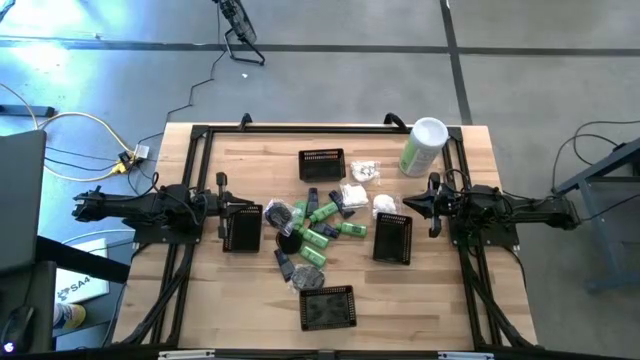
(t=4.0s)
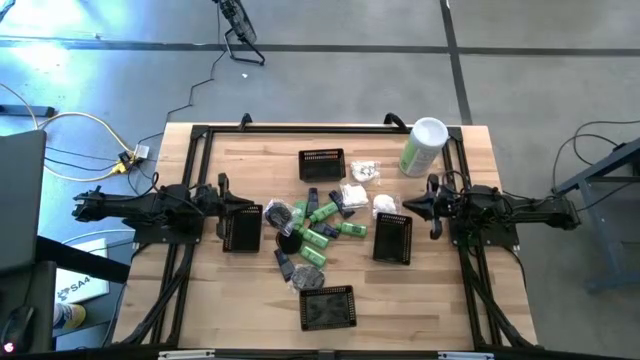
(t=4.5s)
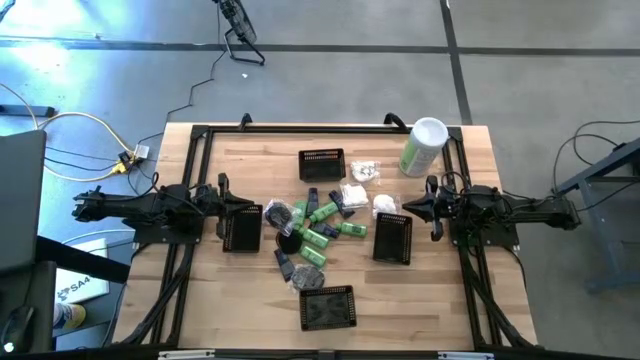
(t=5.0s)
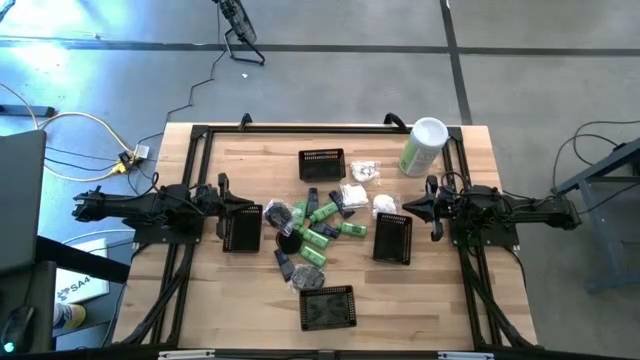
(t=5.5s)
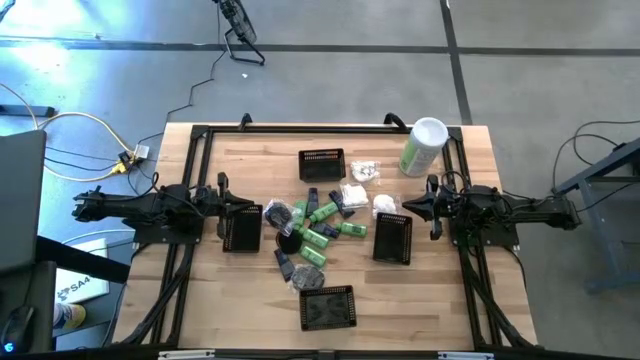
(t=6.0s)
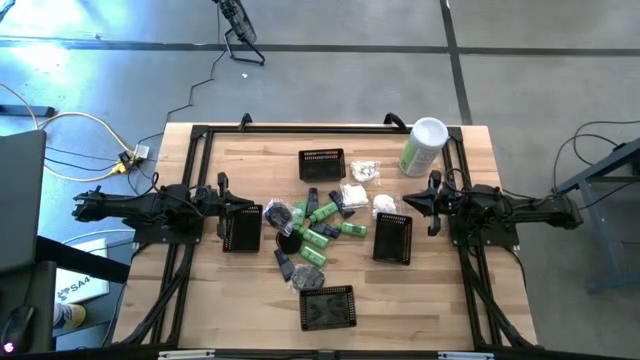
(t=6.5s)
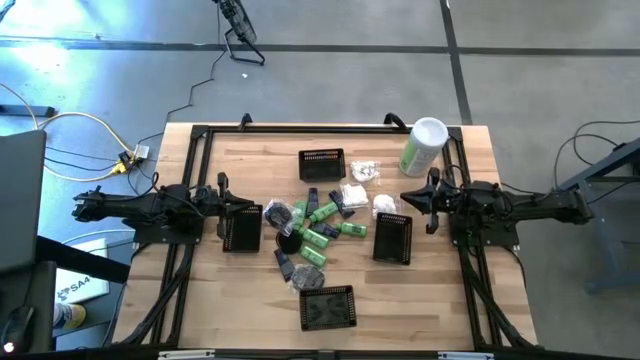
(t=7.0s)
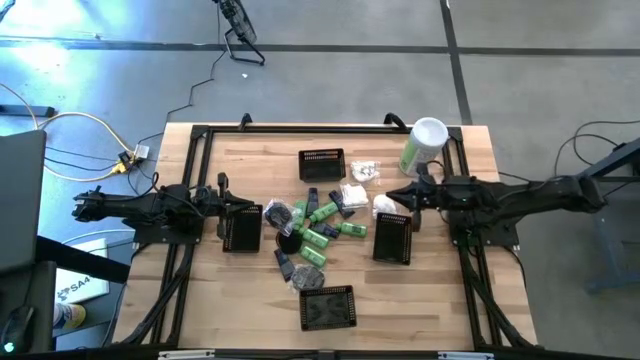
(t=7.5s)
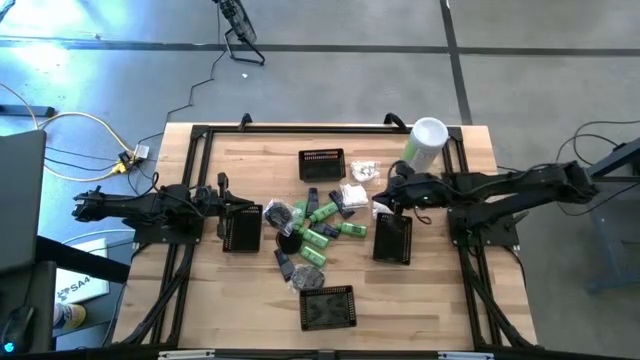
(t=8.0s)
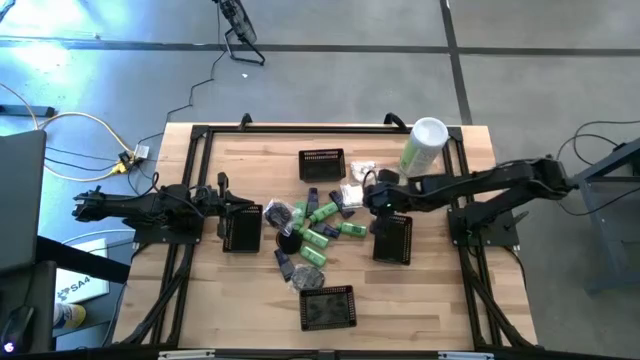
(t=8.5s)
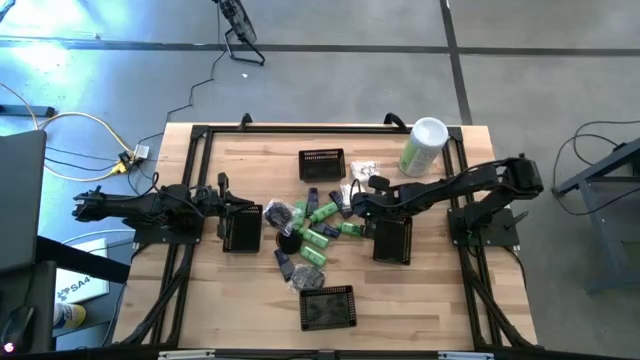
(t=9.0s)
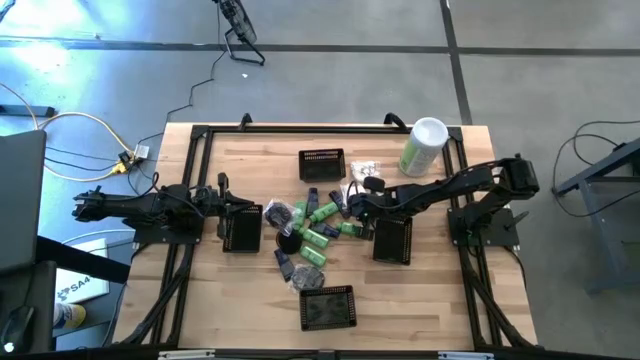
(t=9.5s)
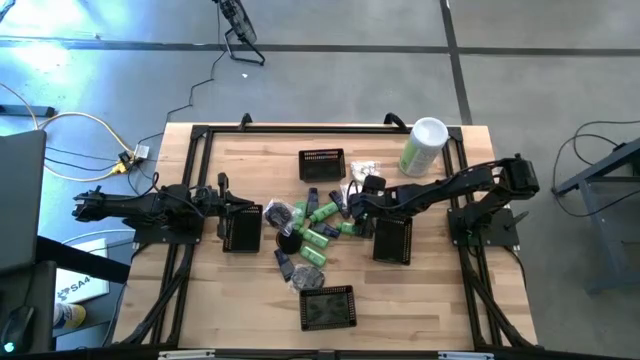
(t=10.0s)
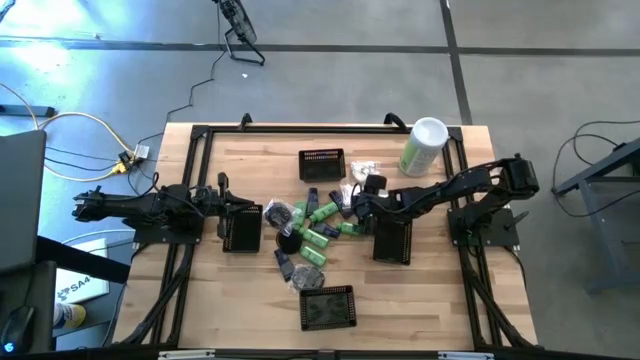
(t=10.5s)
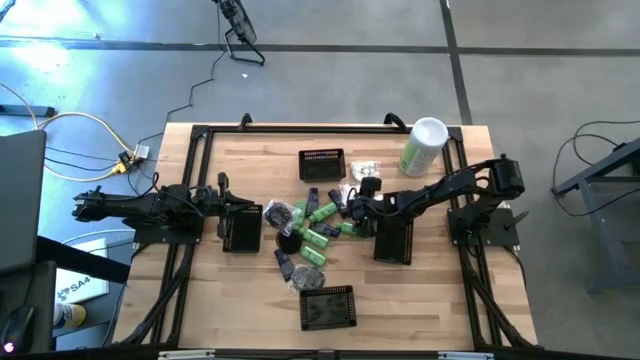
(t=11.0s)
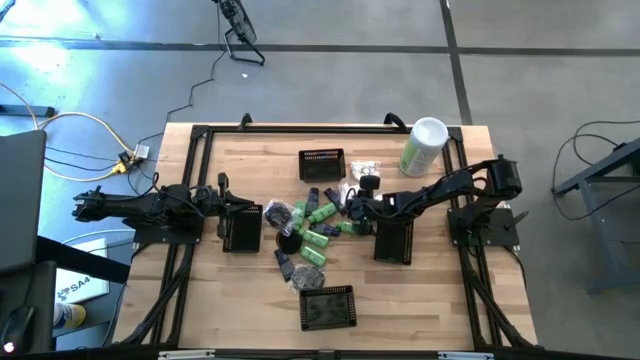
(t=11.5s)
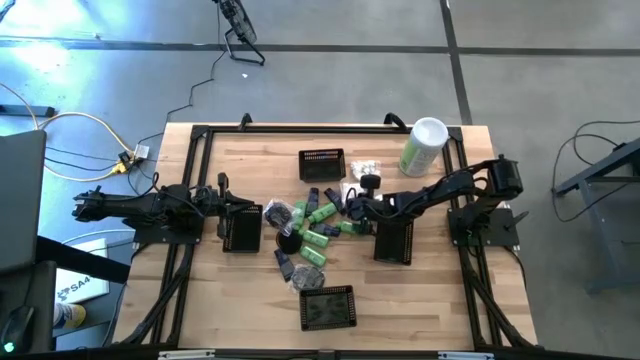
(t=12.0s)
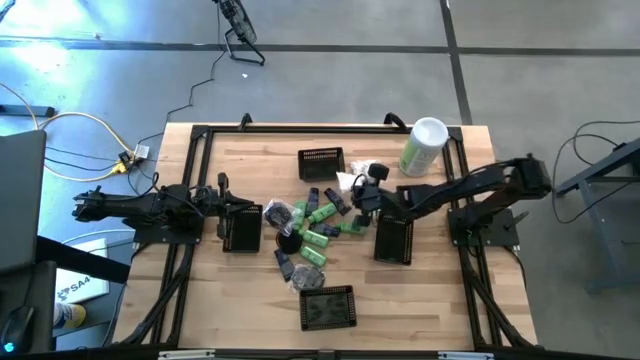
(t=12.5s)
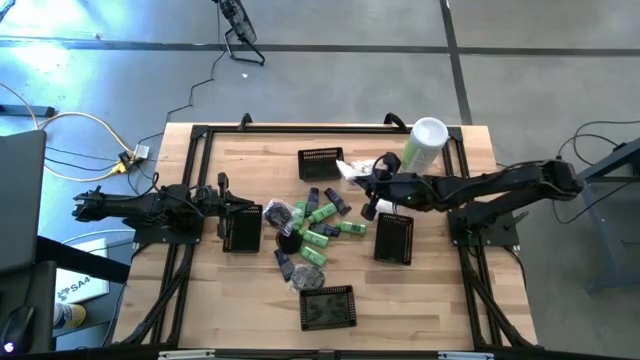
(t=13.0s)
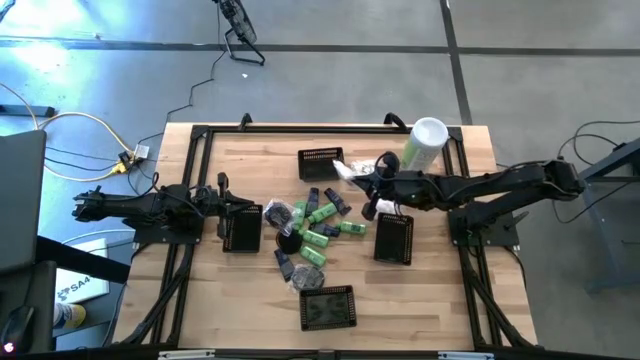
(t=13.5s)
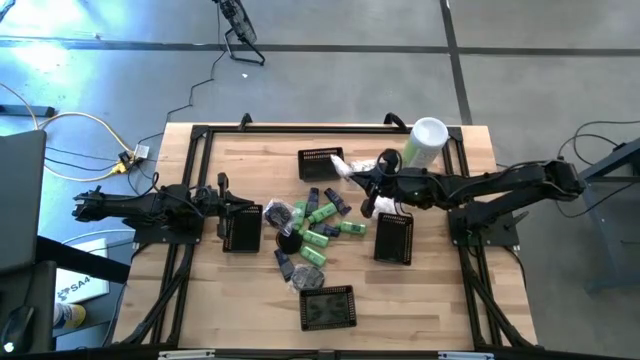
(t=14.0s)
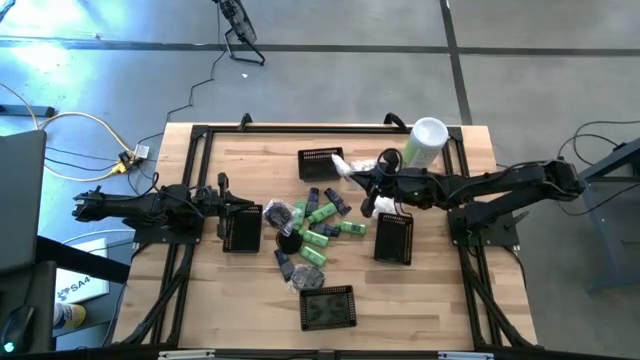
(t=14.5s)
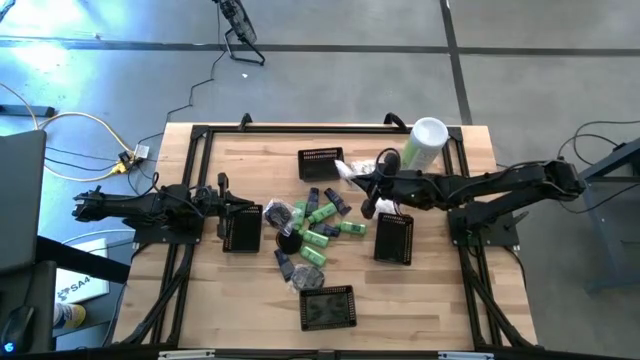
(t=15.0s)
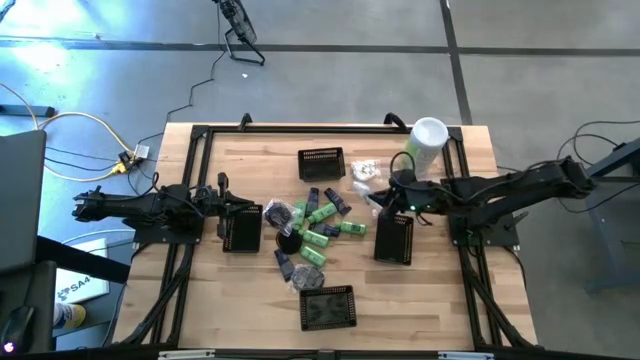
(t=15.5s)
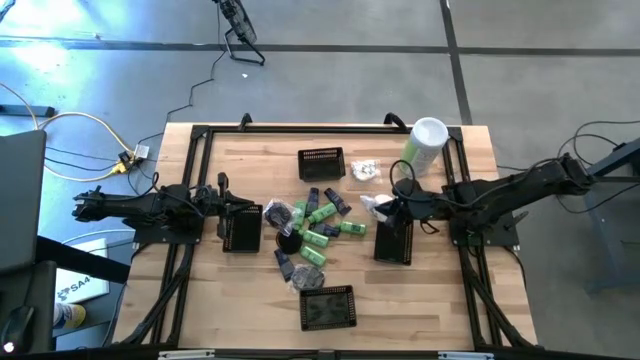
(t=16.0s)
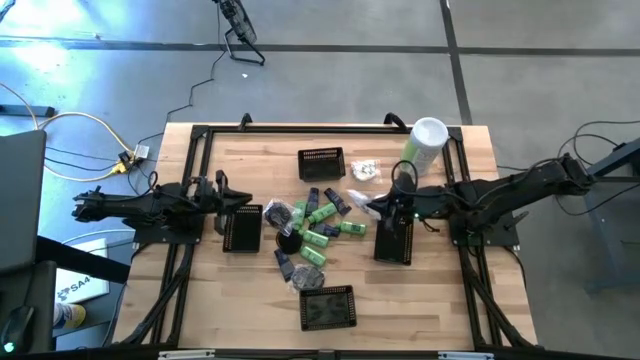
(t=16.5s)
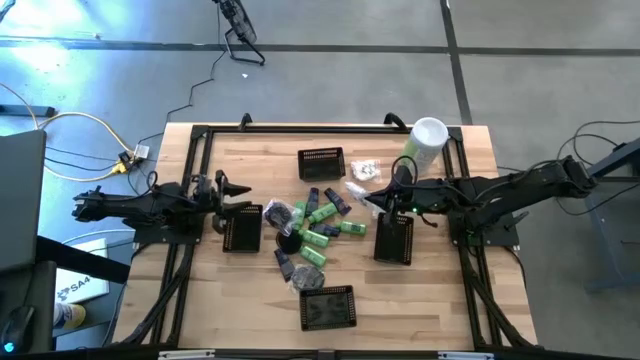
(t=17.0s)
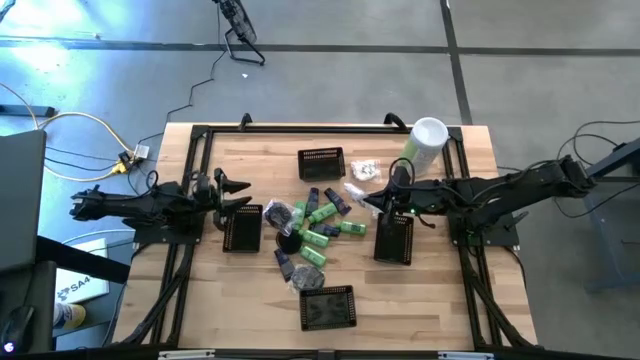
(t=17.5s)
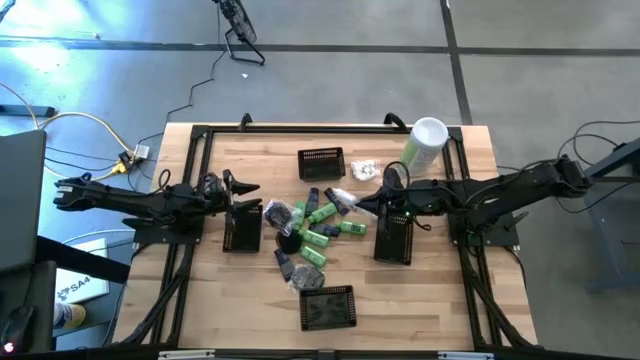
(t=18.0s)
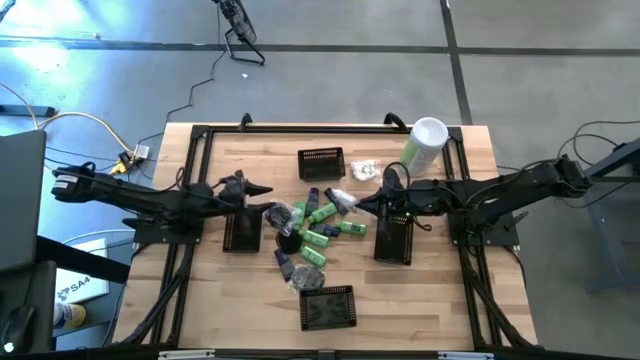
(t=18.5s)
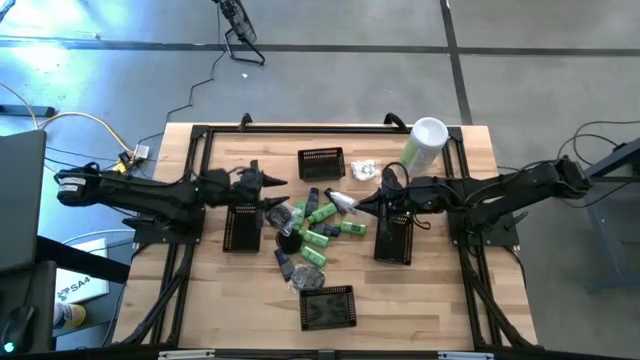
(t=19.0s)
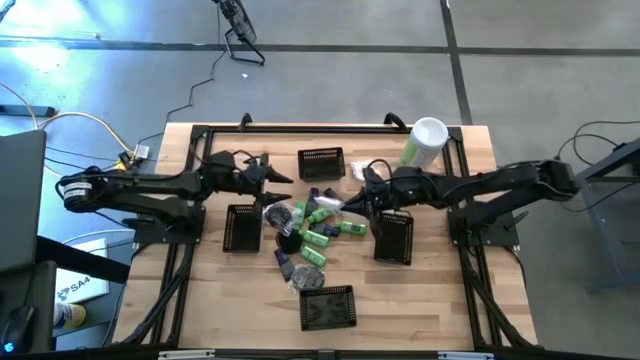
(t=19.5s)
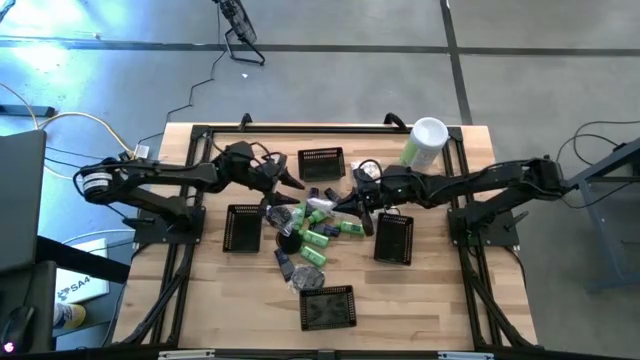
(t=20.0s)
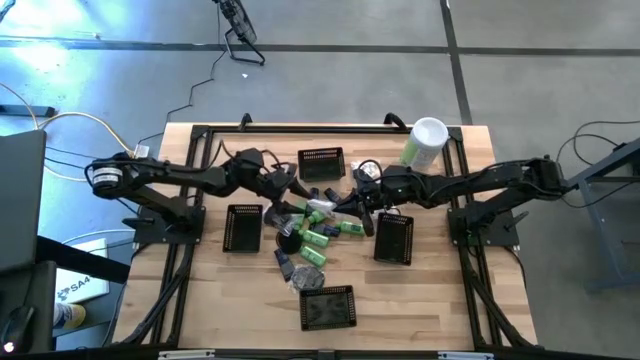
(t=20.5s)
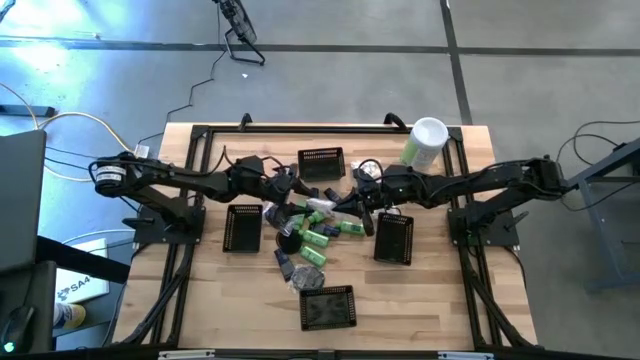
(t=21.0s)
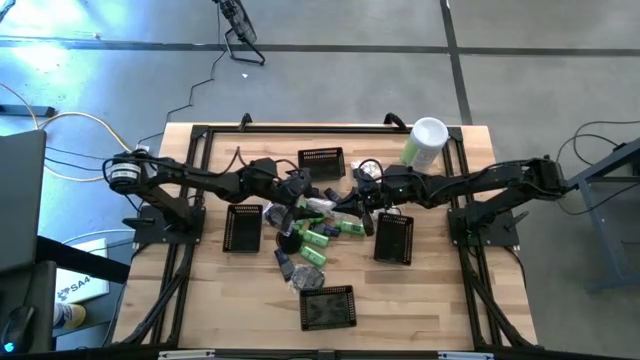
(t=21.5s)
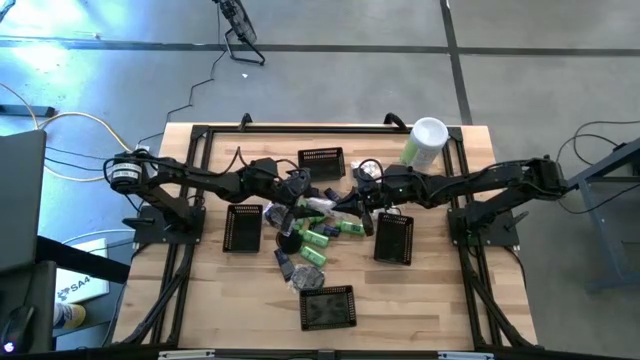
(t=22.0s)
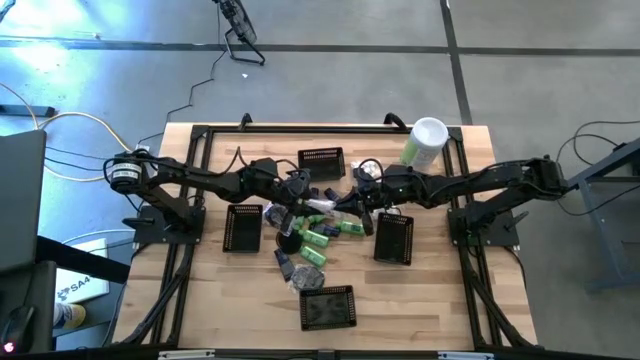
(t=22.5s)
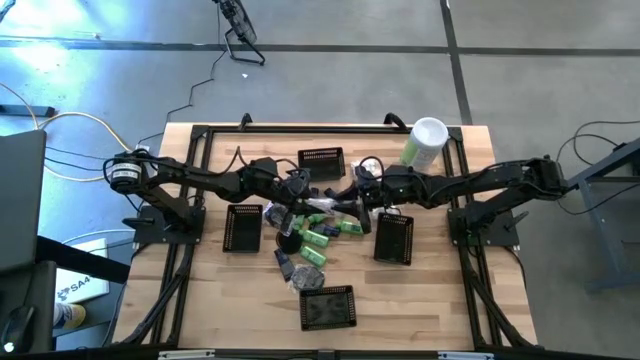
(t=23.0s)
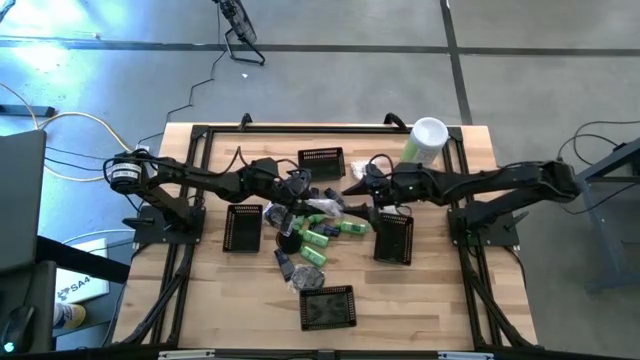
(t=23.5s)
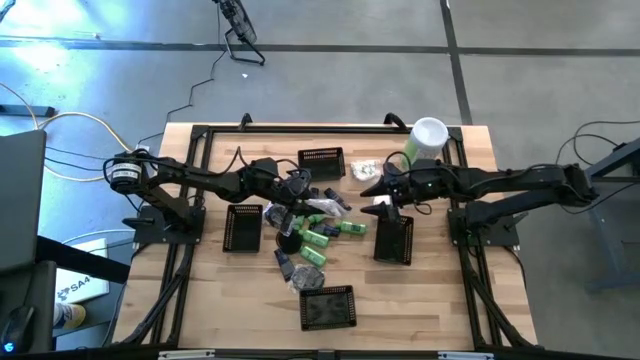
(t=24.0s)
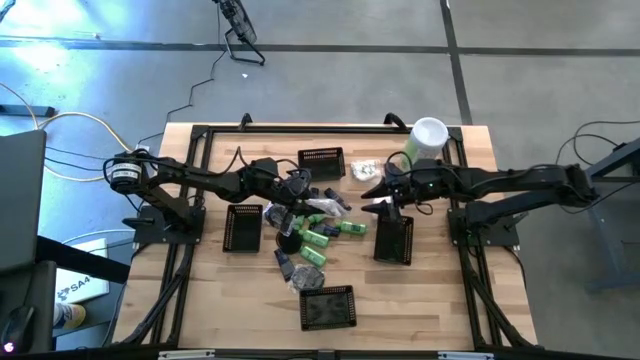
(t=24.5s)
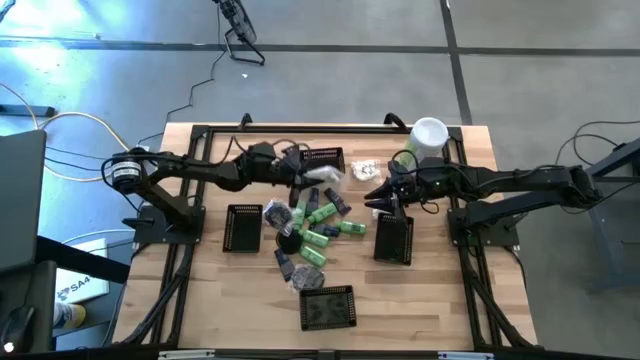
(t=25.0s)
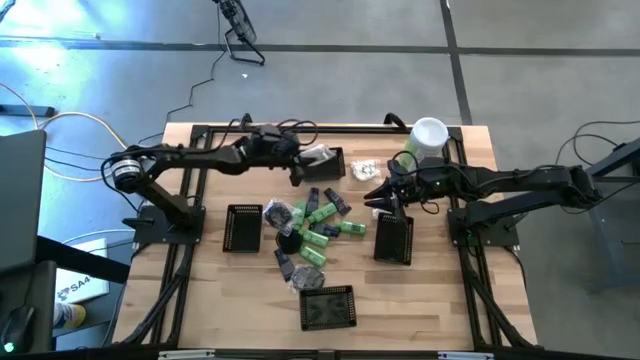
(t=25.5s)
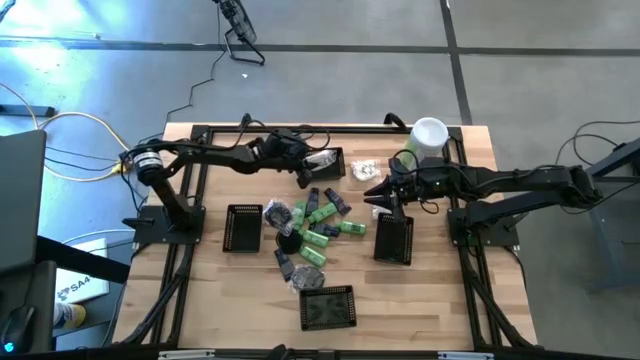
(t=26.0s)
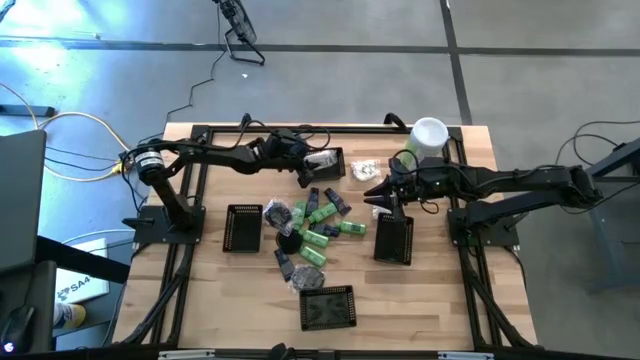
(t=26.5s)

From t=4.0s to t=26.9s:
Task: Pick & Place Travel size toiletries
Put the left pack of cotton buds into the top middle black bin
